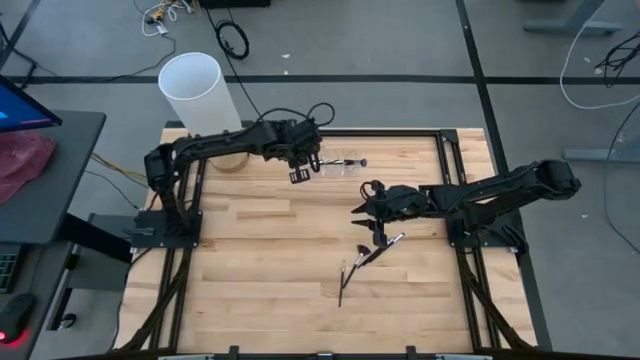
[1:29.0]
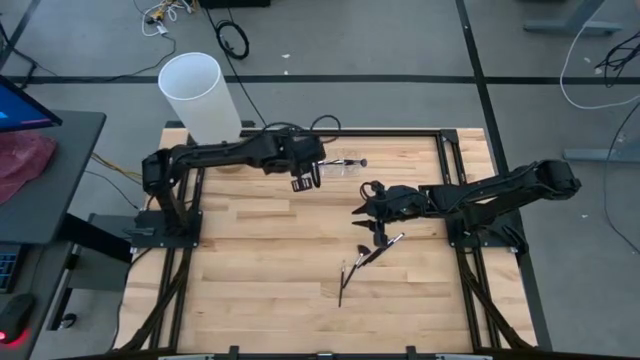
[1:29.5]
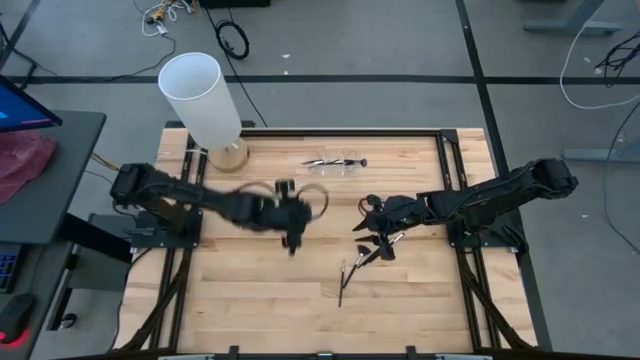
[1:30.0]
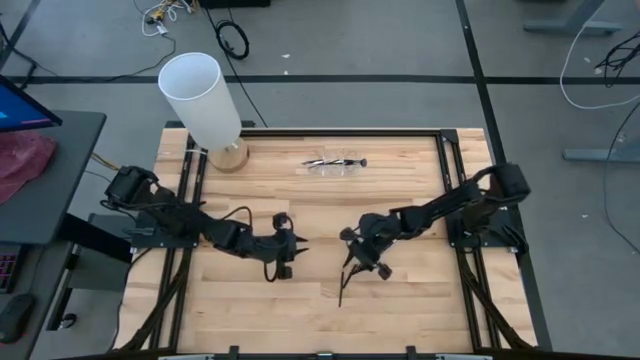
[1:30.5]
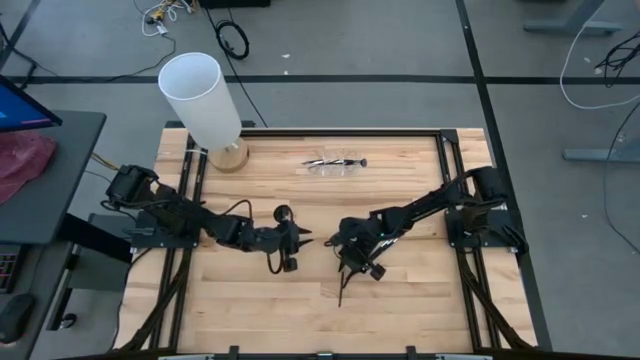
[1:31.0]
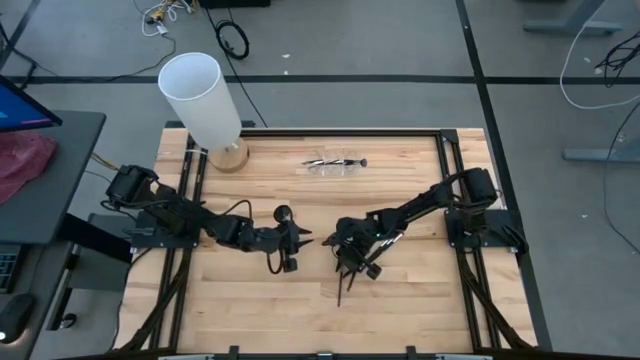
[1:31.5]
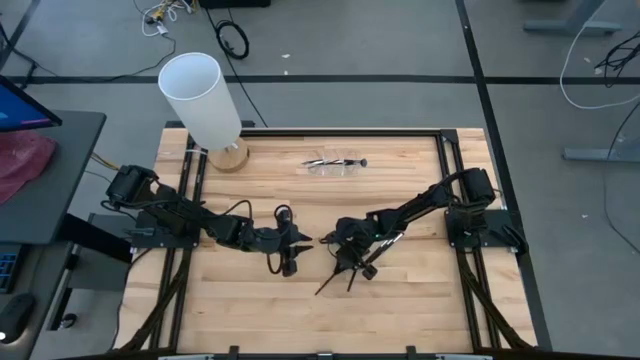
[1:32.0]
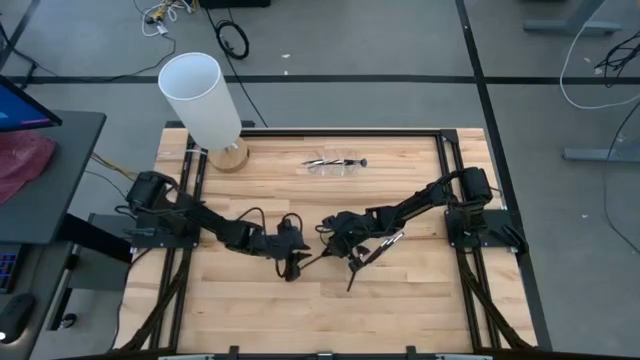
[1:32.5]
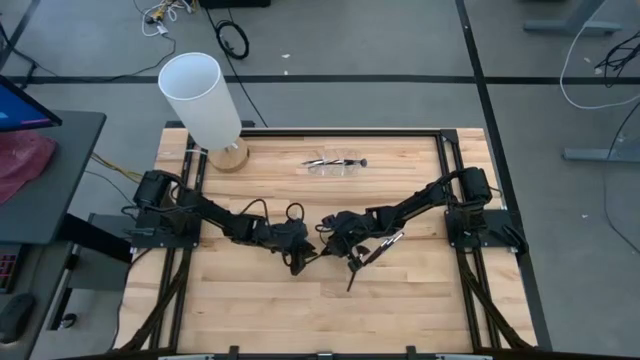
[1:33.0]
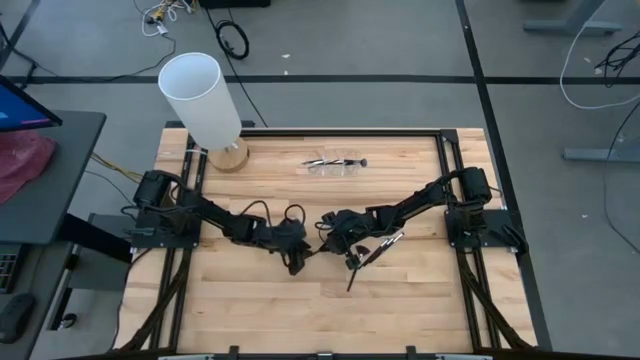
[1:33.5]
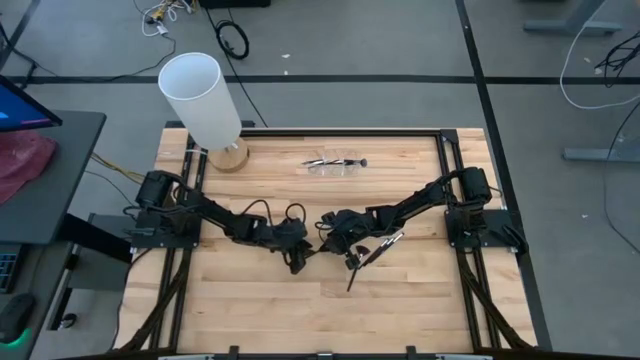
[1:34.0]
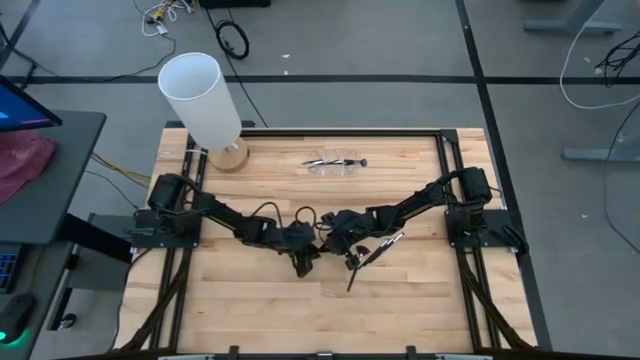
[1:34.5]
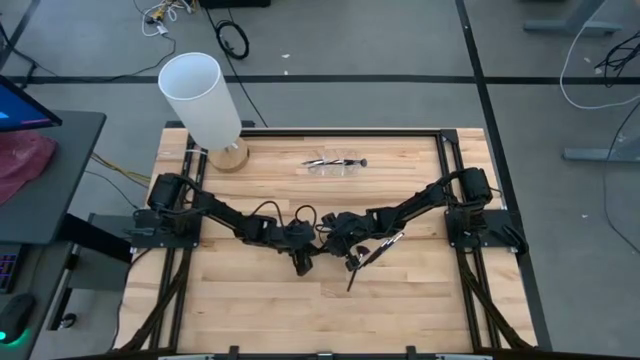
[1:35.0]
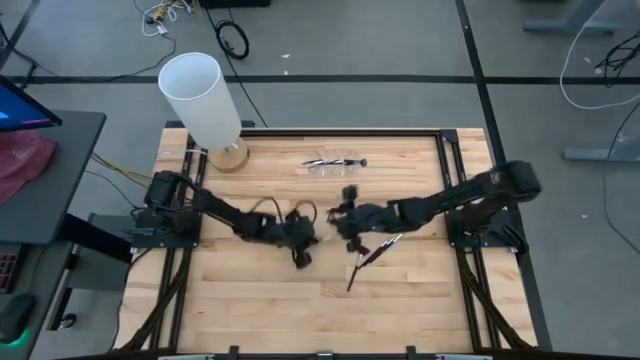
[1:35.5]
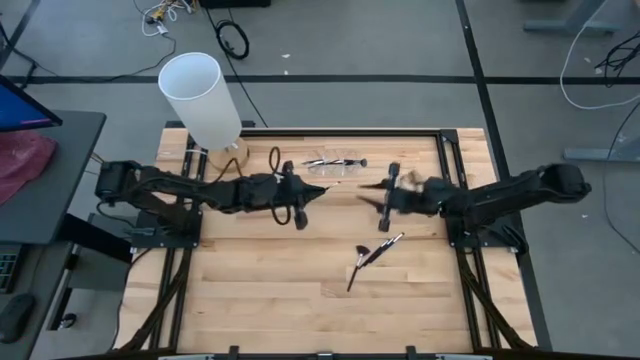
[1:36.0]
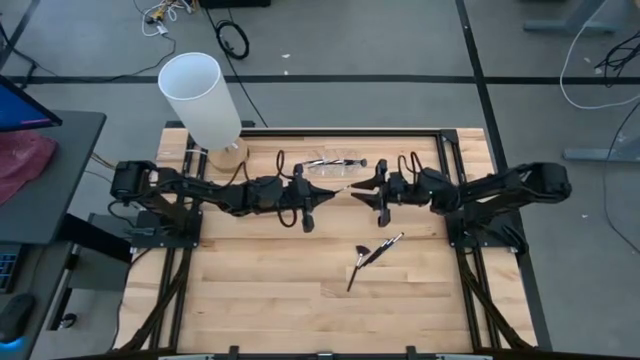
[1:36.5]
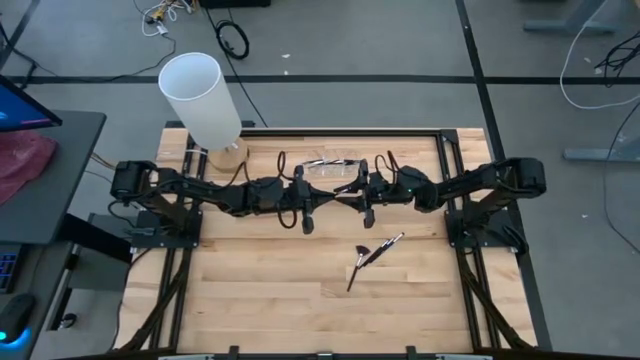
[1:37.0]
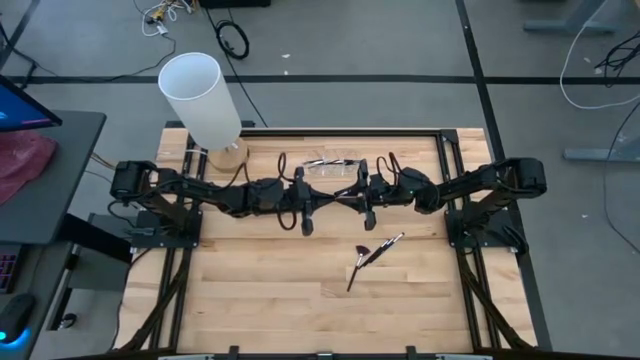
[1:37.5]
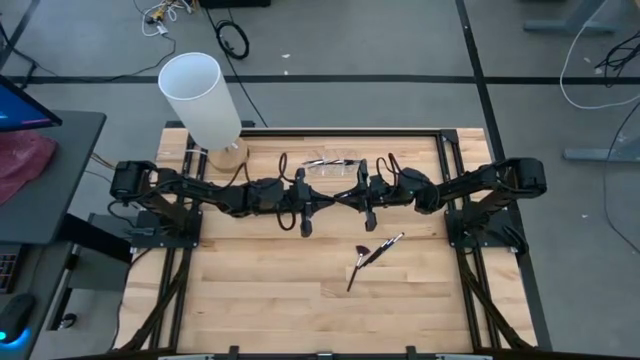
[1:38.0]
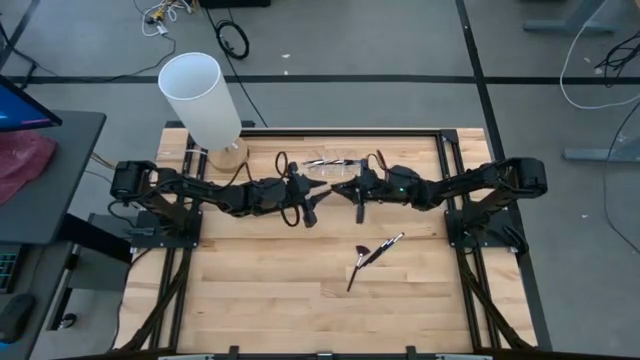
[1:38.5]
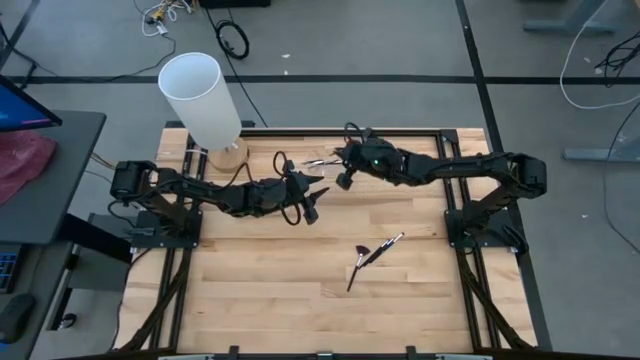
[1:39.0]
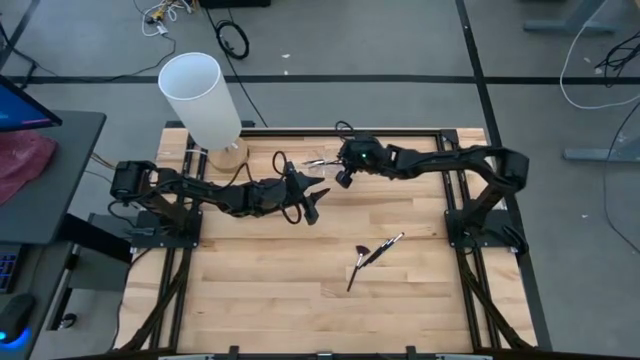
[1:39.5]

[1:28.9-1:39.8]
Task: Pick & Place Makeup Supplies
Put the makeup brush into the transparent organizer

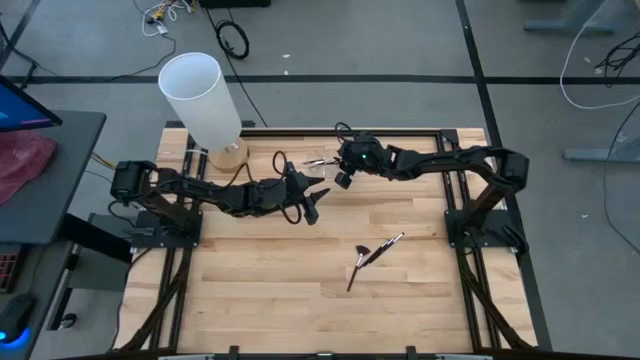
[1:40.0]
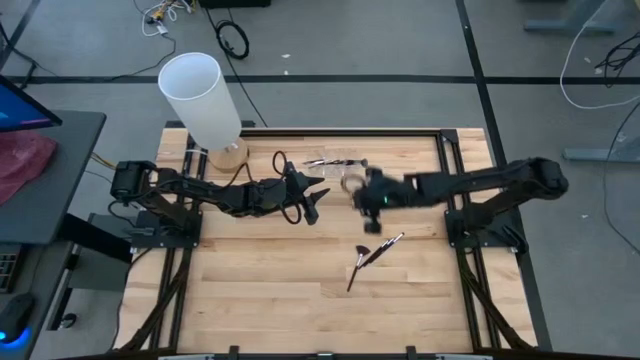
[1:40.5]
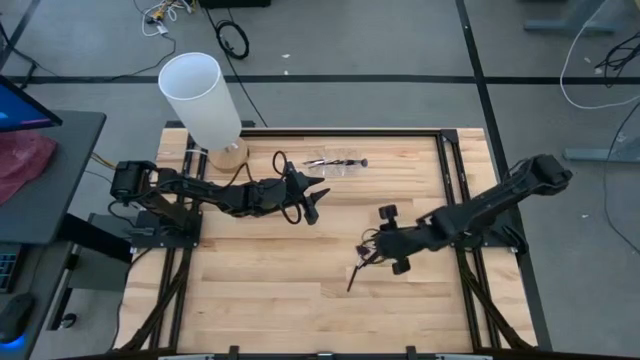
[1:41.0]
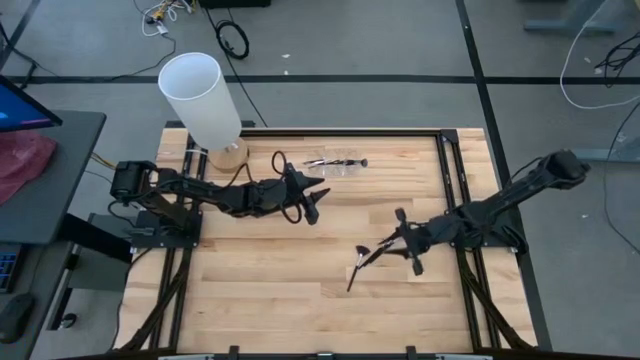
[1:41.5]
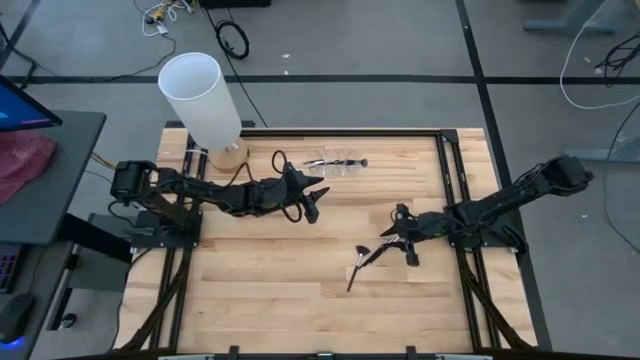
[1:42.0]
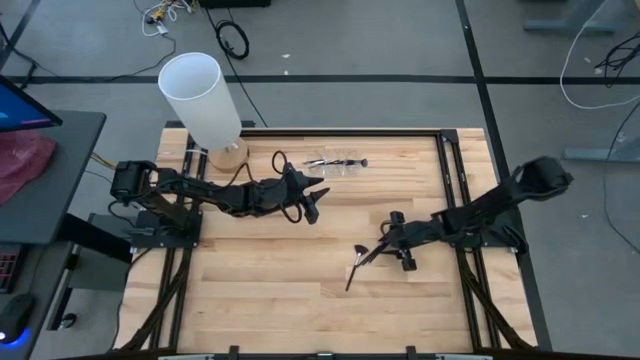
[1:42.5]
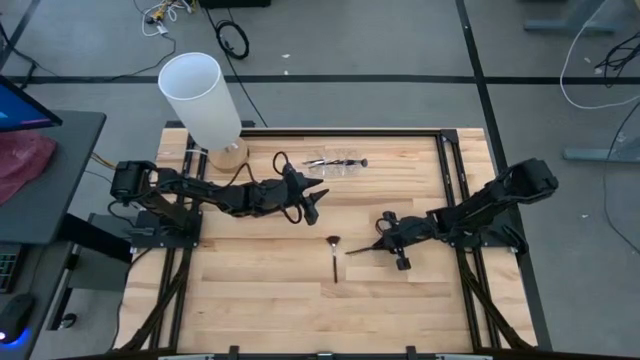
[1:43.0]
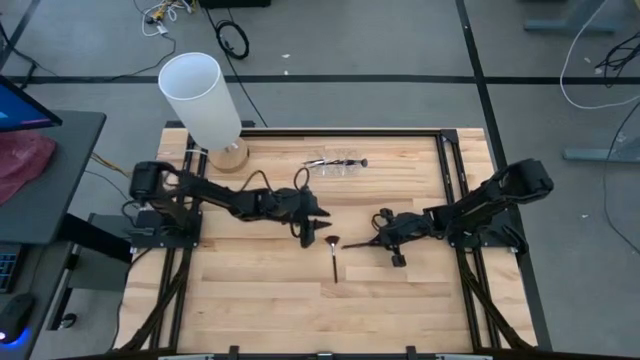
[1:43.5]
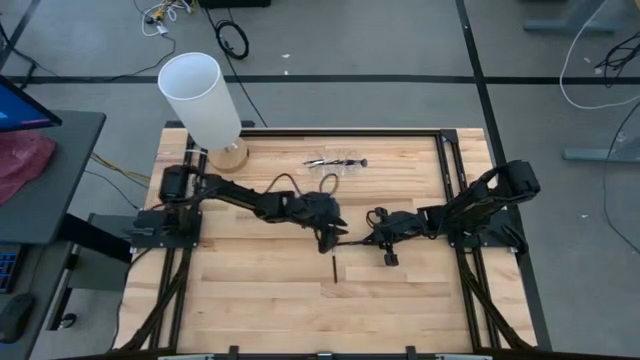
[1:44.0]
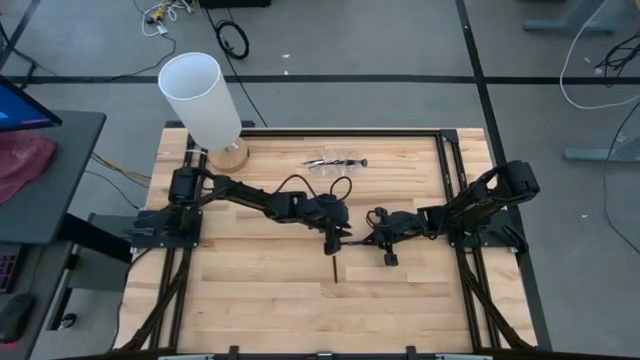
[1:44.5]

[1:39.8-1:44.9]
Put the makeup brush into the transparent organizer

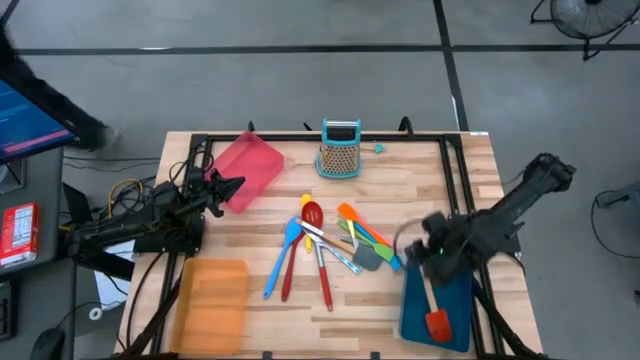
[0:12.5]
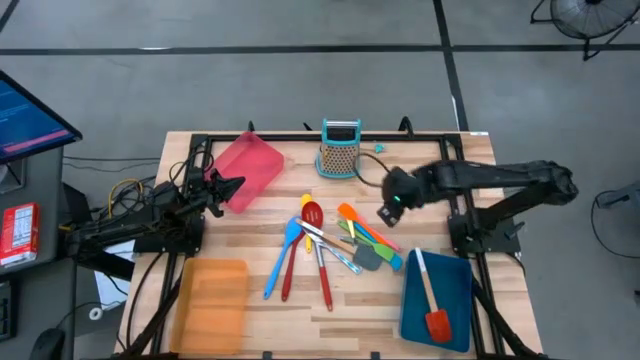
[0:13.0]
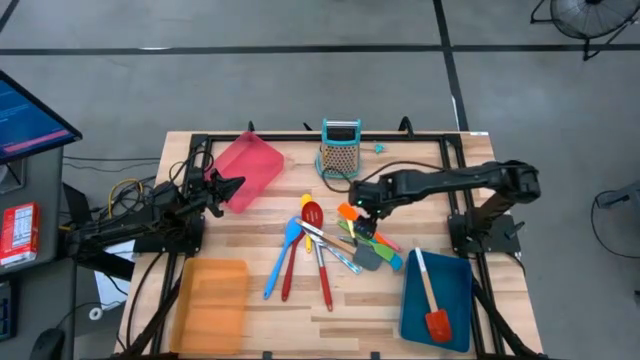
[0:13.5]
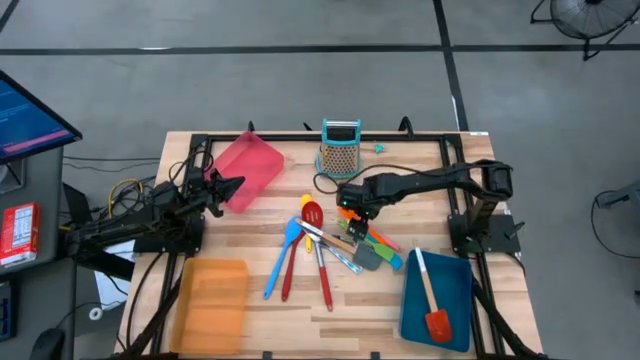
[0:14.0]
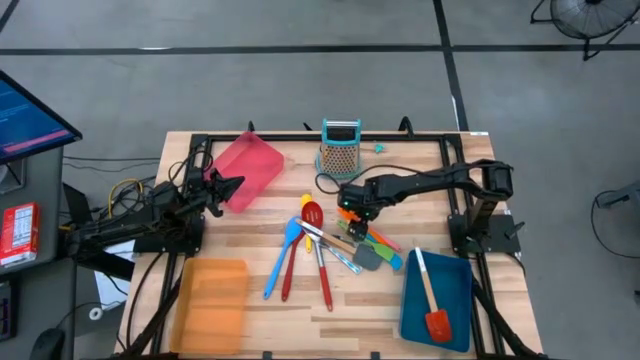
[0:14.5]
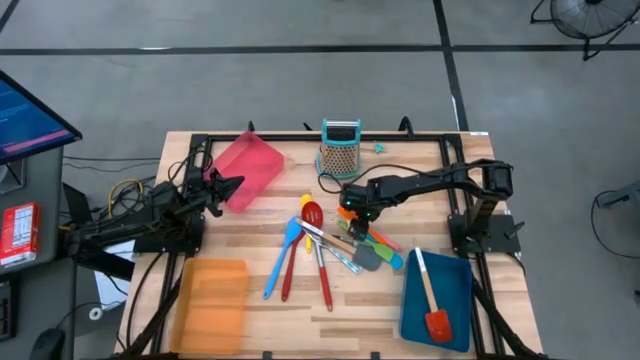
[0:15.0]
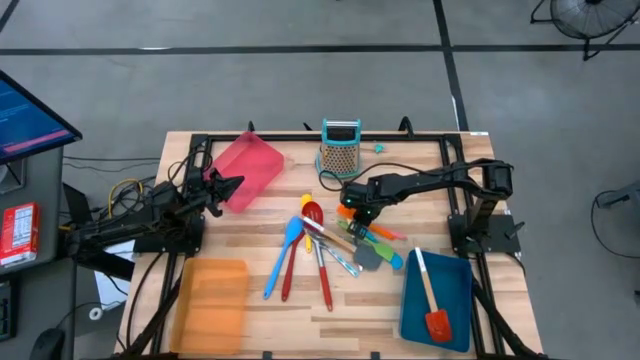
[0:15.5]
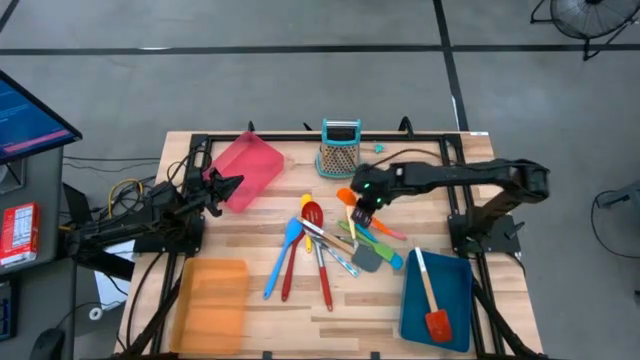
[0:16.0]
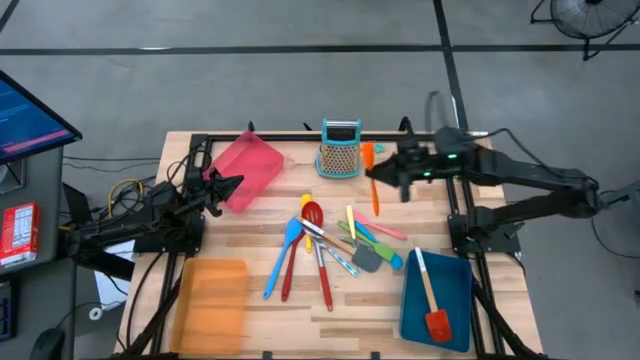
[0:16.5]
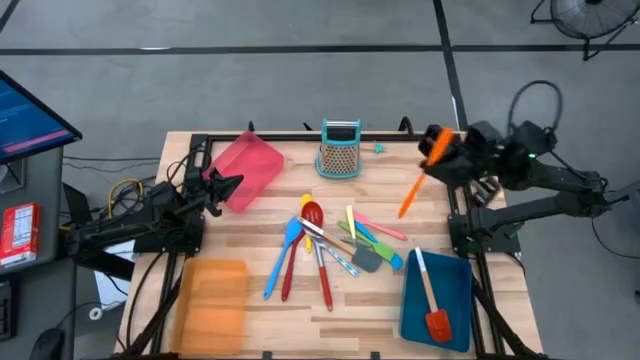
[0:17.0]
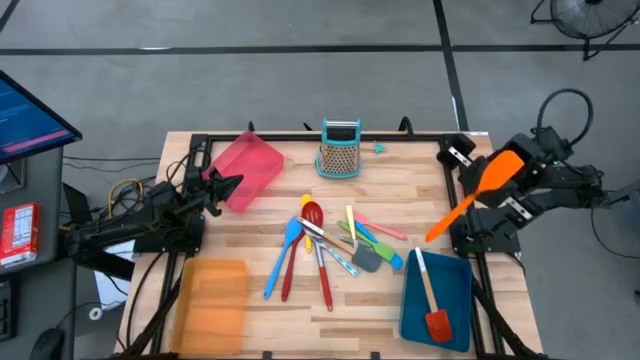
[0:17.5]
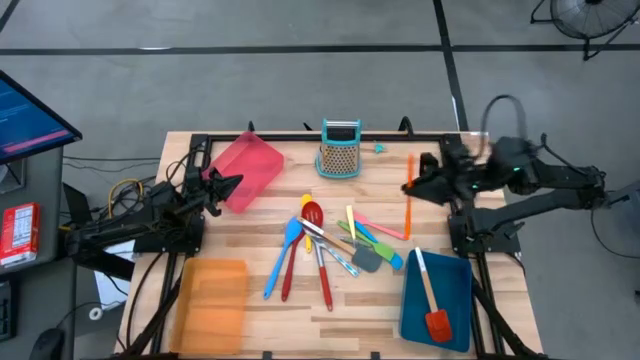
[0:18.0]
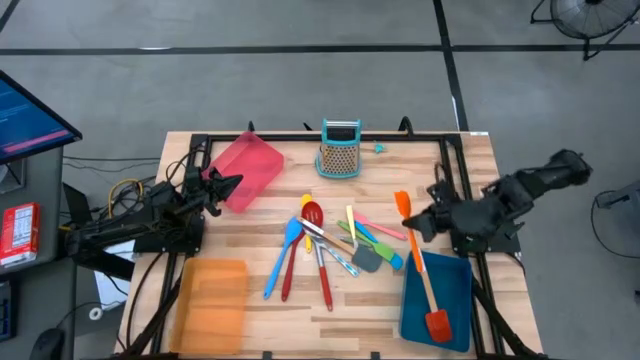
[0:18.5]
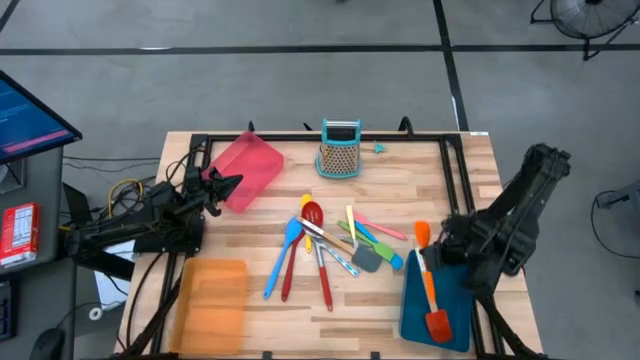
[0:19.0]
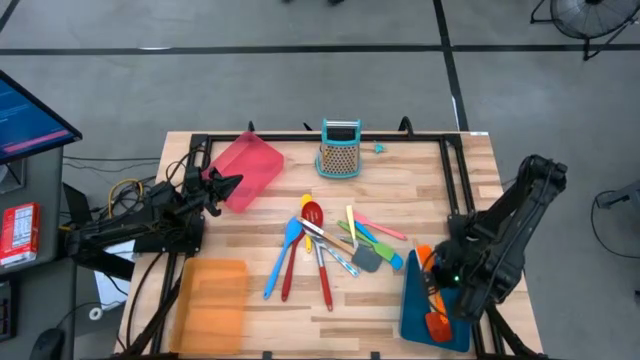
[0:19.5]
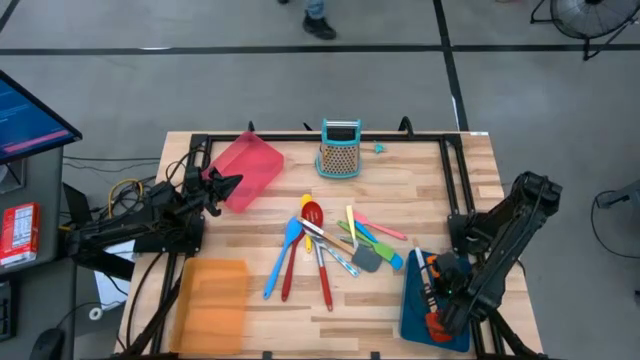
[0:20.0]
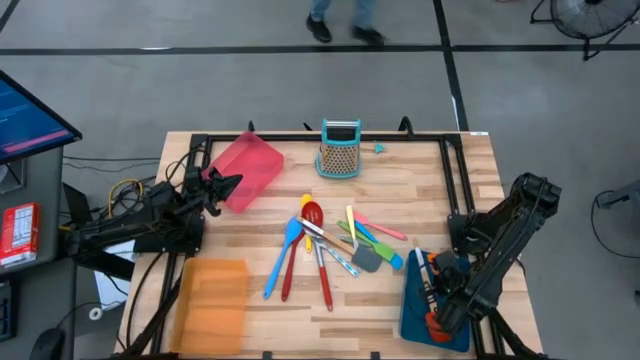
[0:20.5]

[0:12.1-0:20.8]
Task: Pick & Place Kitchen Items
Put the orange spatula into the blue bin
